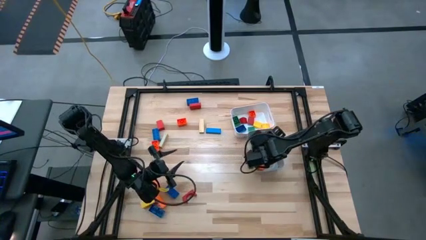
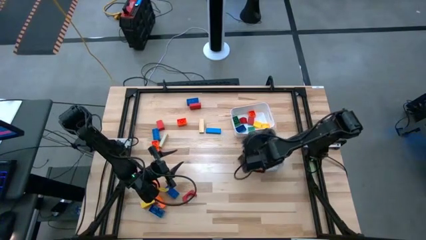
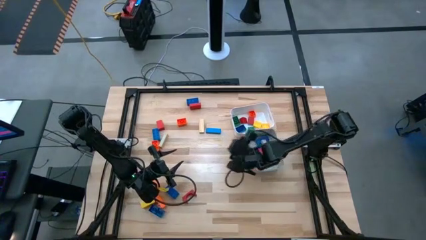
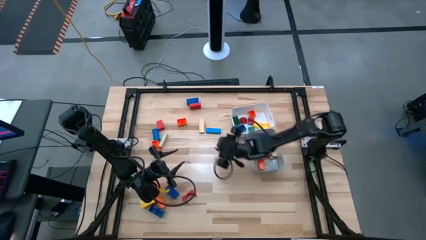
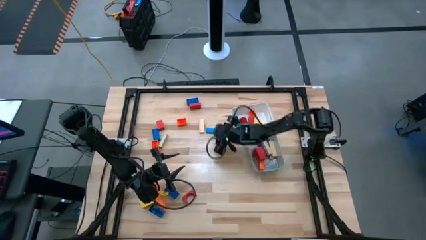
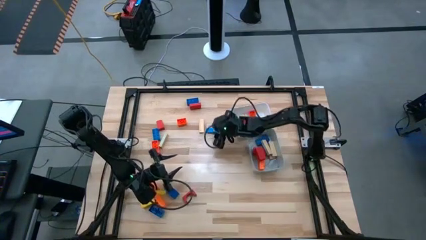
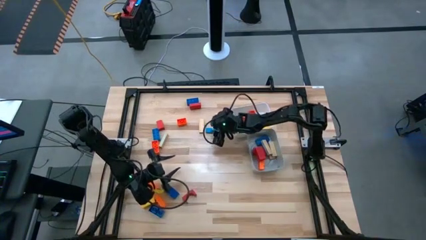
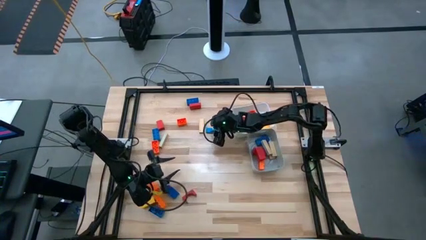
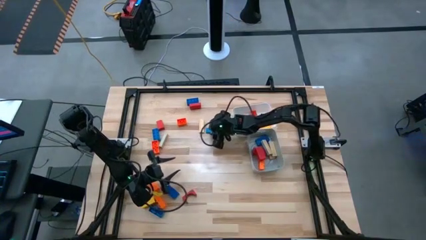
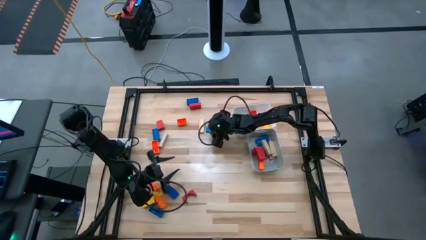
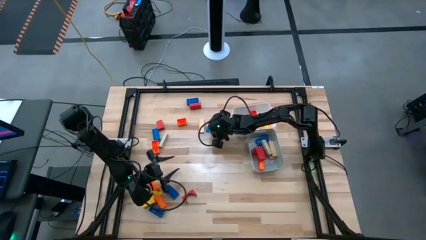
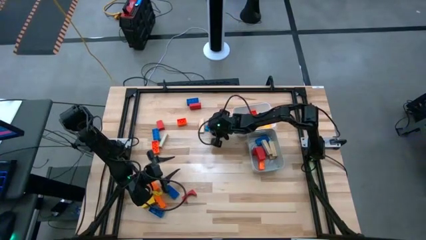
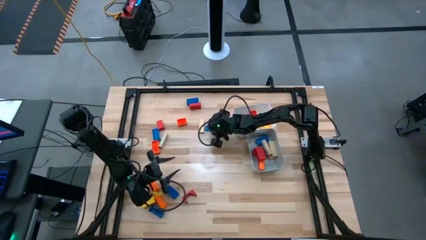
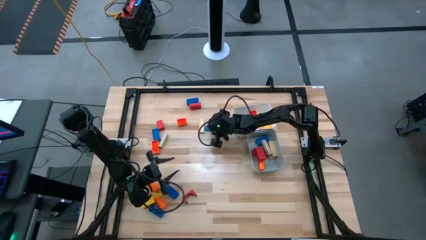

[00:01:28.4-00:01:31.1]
Task: Sort blocks by size
Put the large blue wooden block into the gray bin

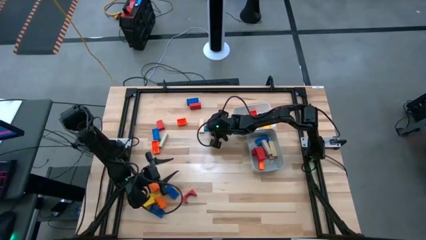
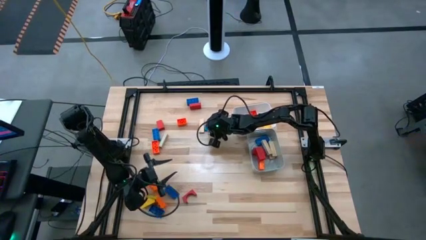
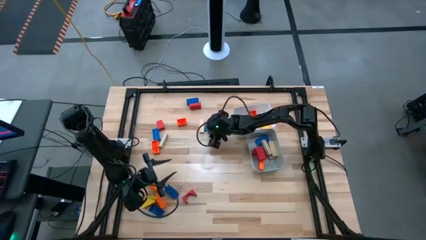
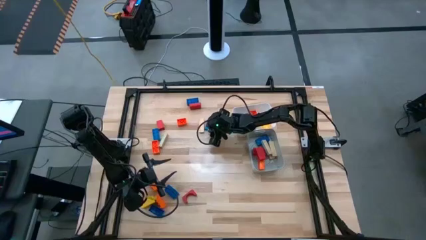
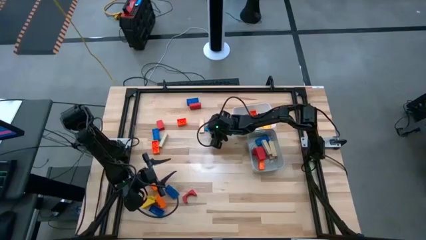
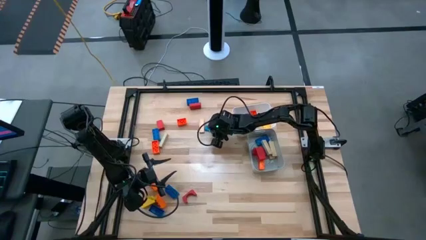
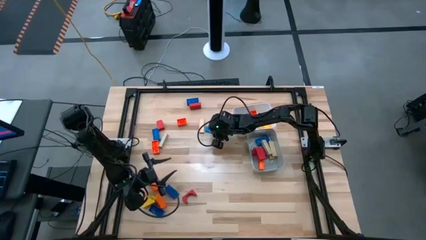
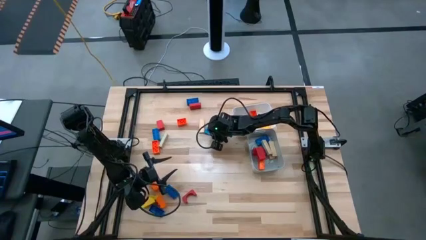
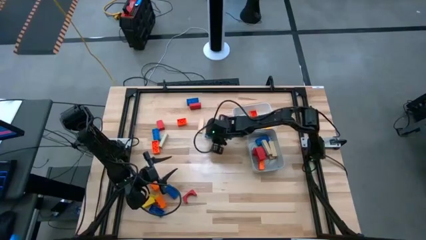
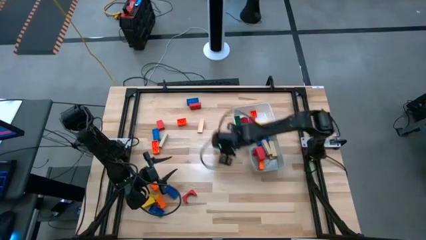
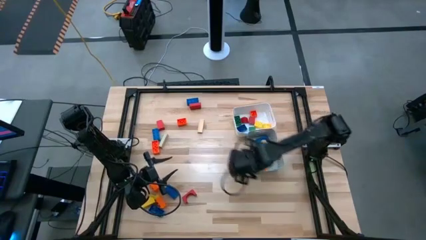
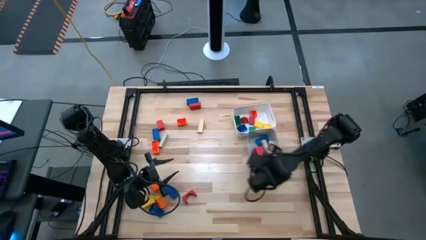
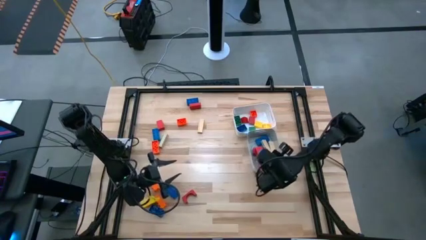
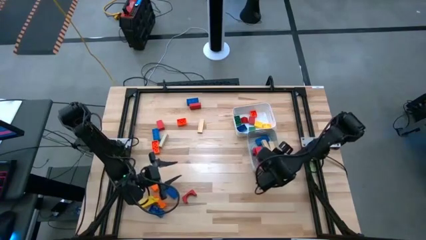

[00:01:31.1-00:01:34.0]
Put the large blue wooden block into the gray bin

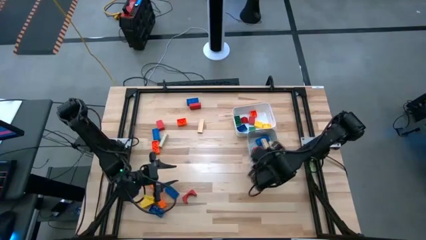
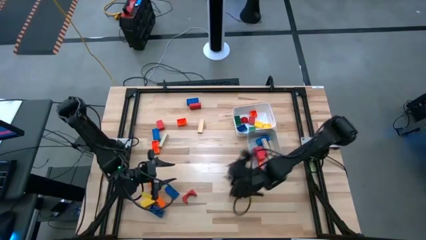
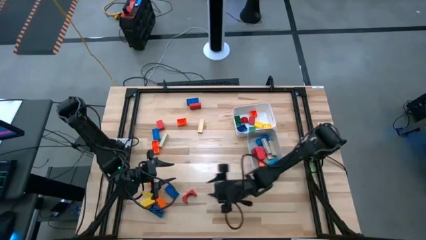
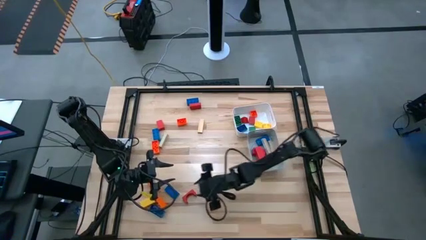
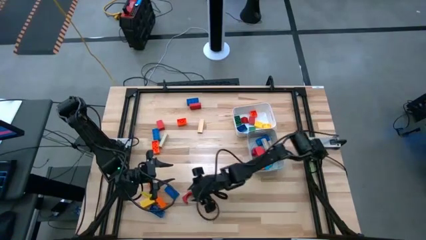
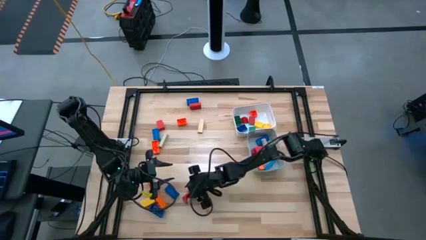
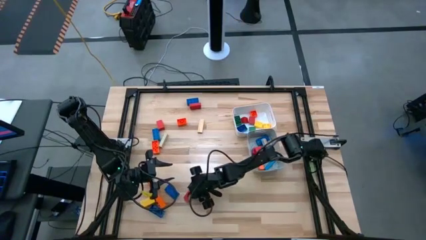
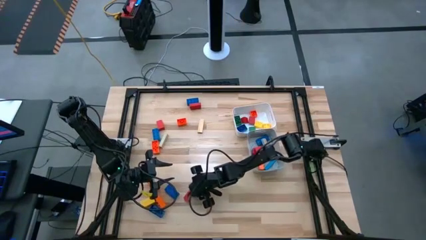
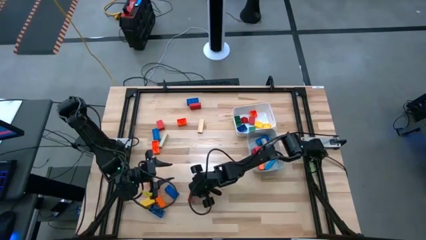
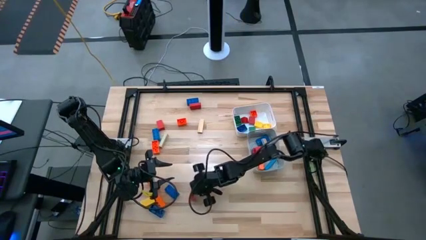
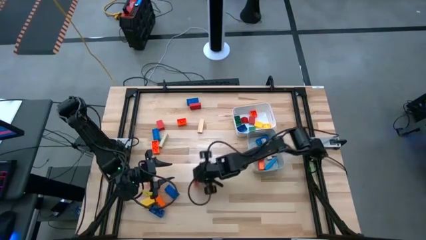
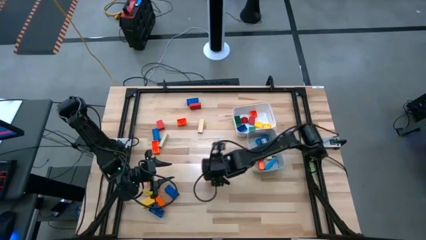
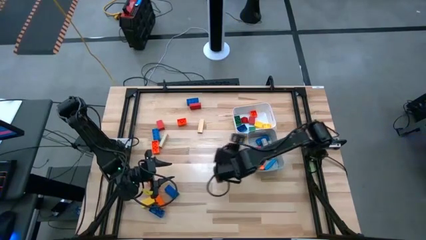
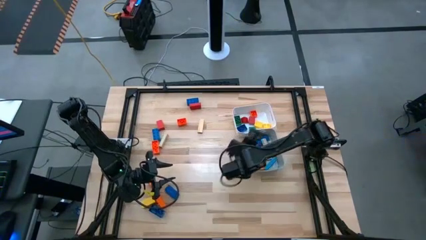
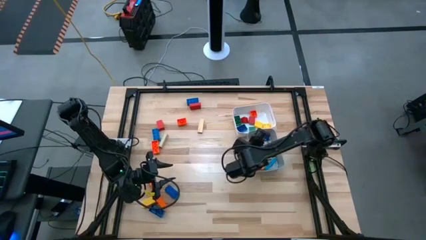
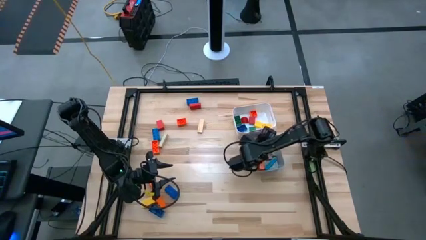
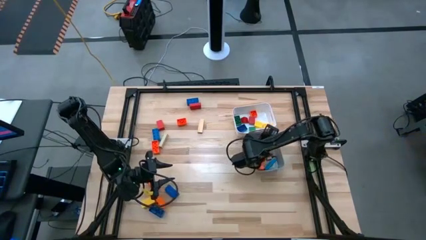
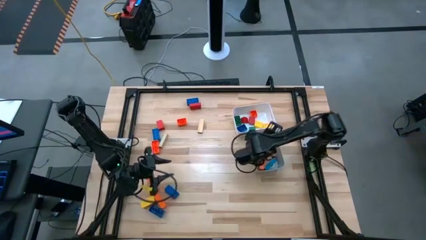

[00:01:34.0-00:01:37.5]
Put the large red wooden block into the gray bin

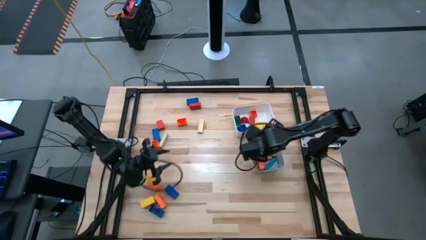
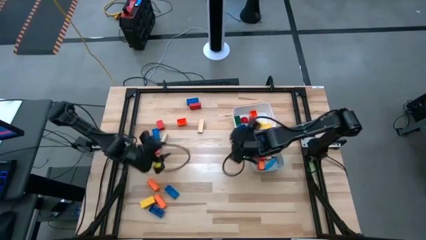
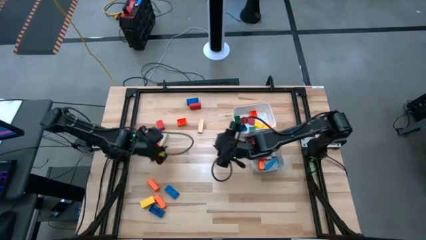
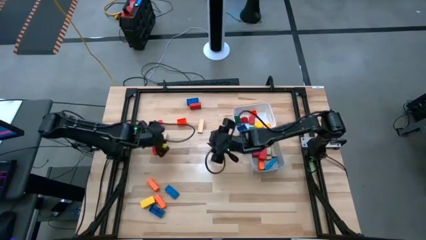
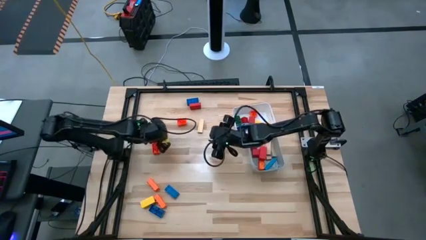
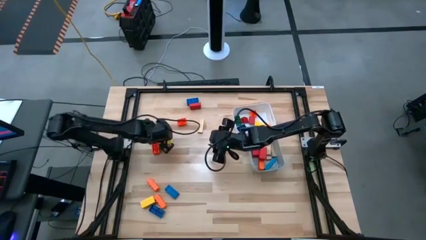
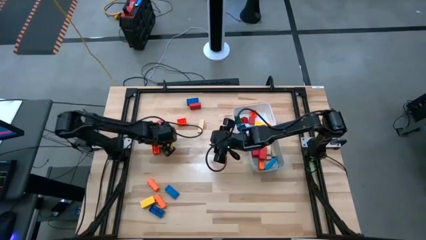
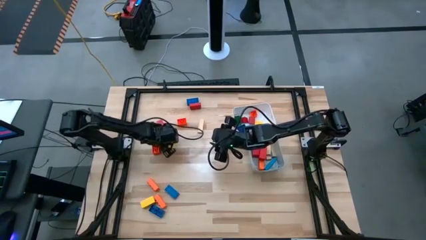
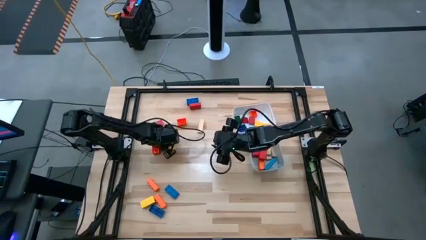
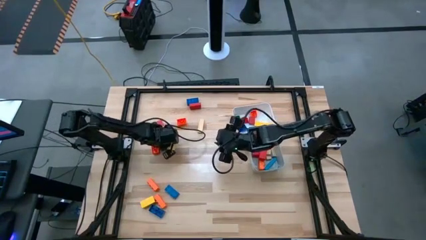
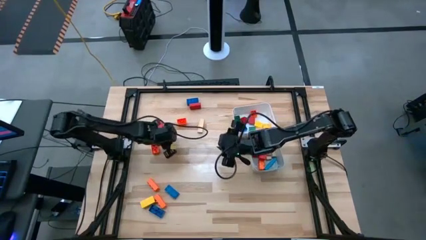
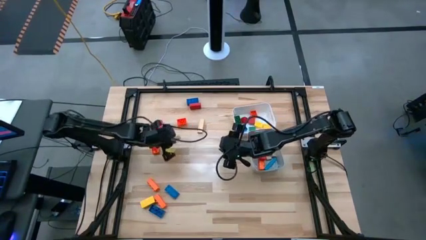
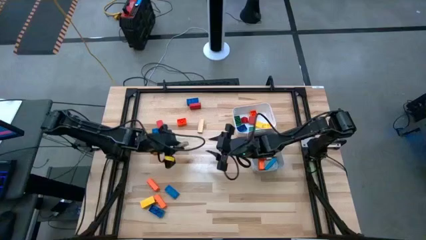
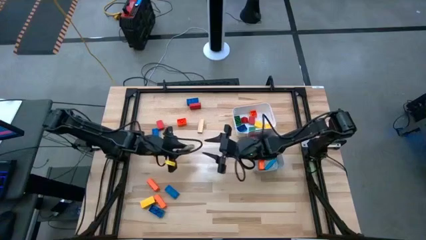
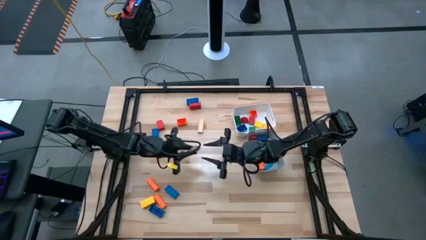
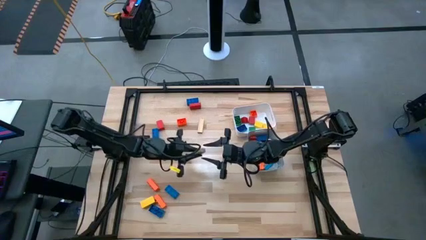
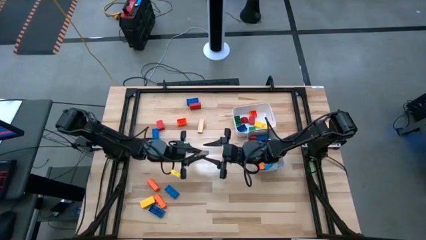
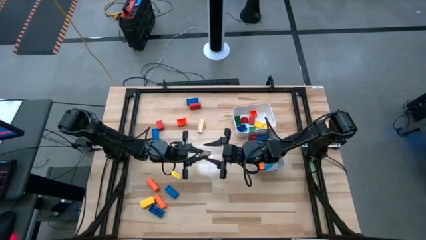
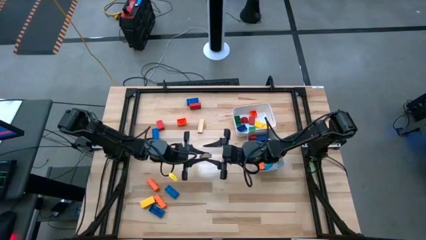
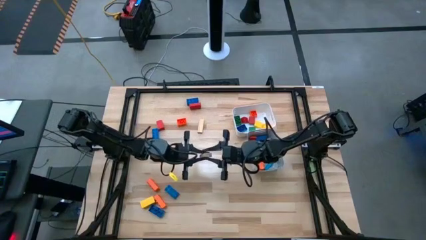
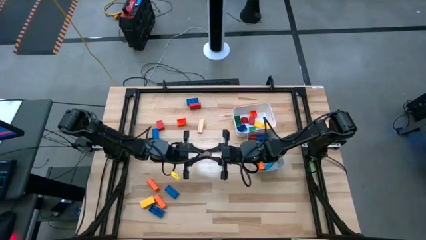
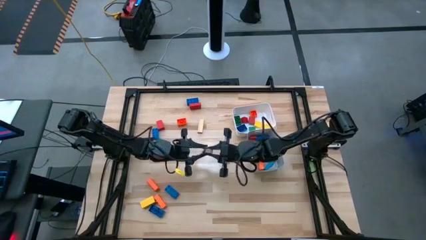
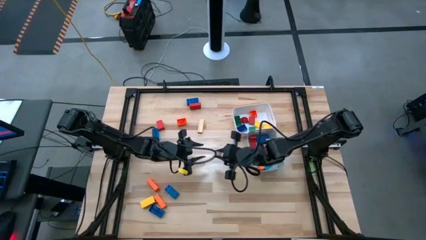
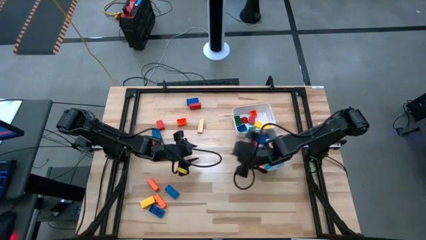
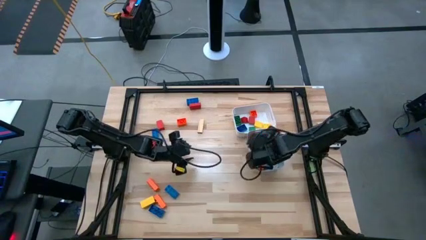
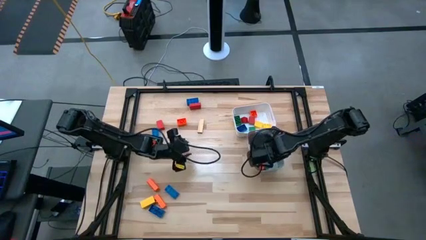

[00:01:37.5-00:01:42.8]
Put the large brown wooden block into the gray bin

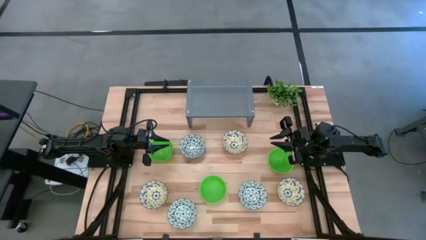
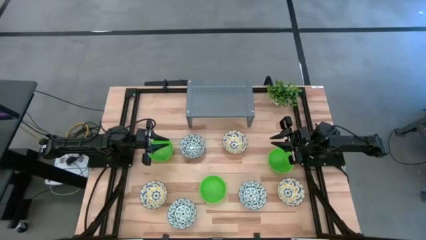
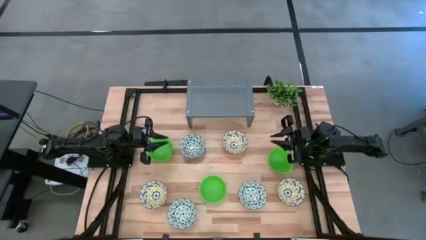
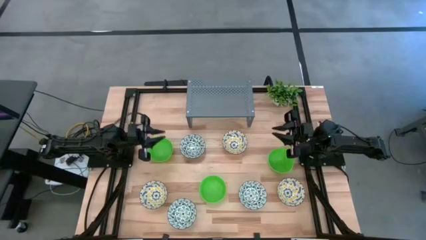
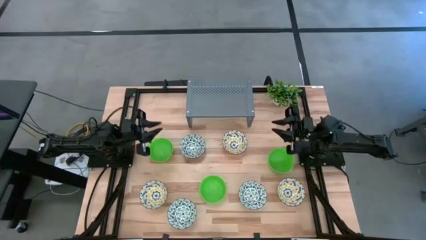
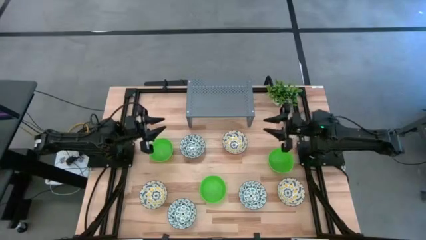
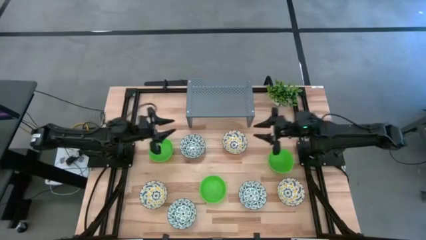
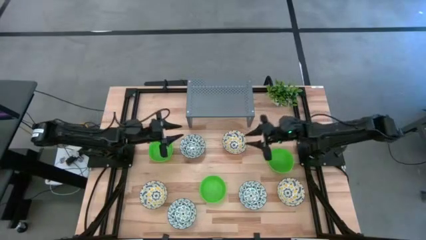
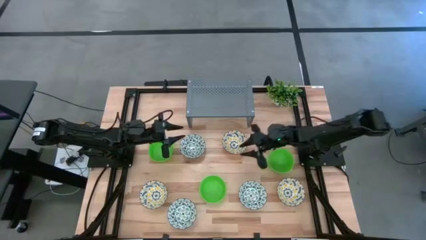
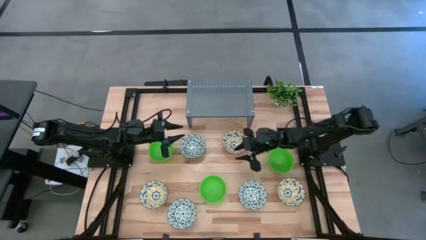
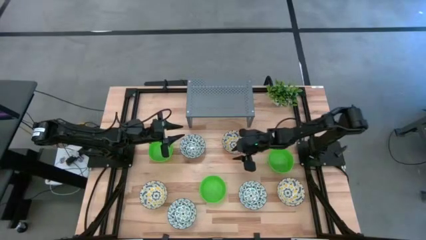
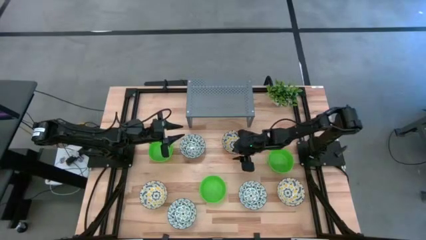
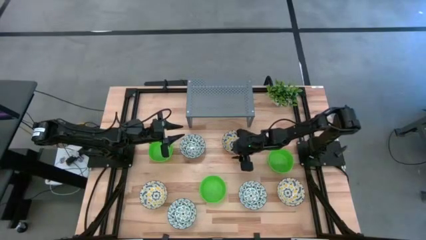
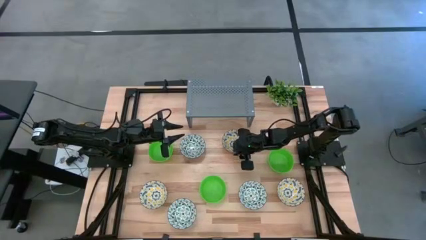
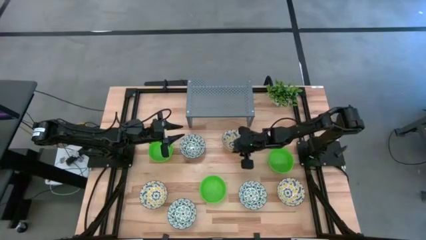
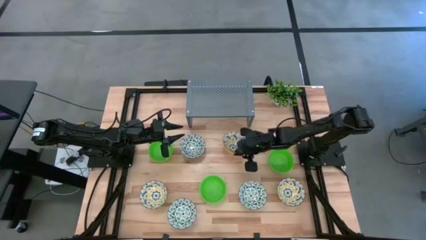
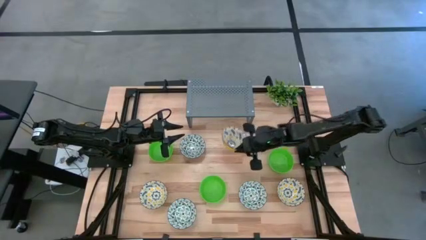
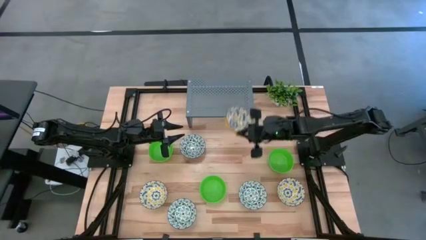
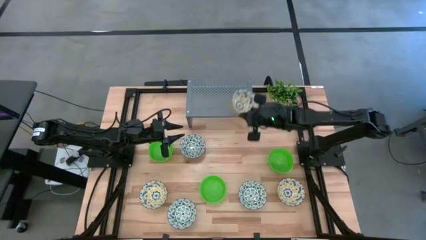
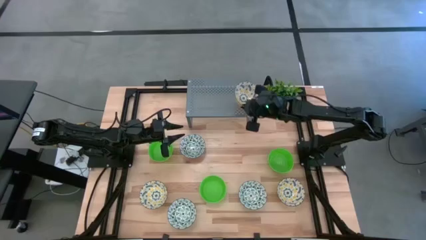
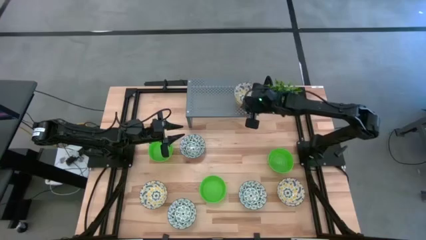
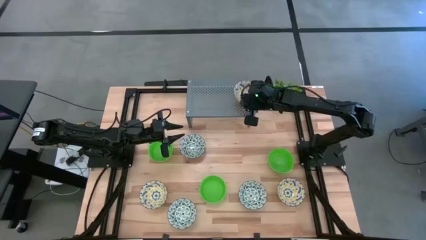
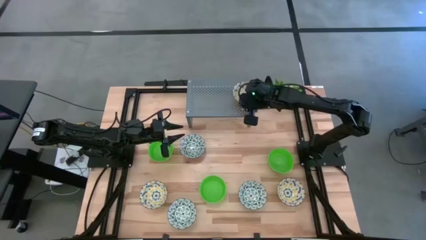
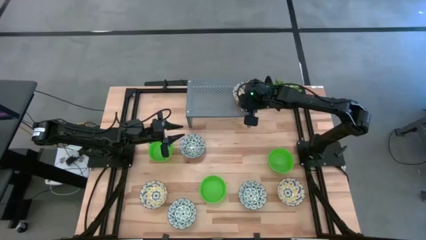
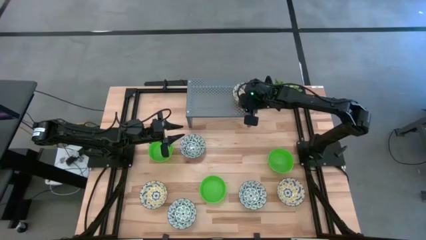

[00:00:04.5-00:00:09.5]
Task: Pick & Place Mini bowls
Put the top yellow patterned bowl on the shelf
